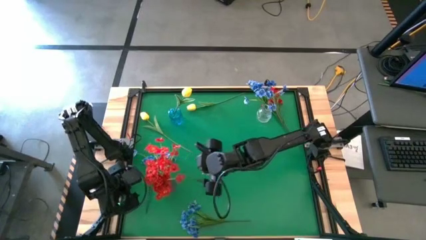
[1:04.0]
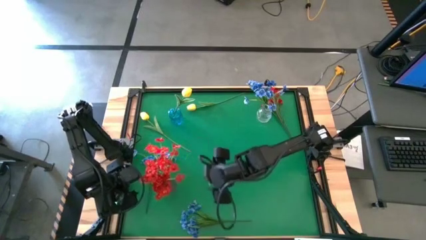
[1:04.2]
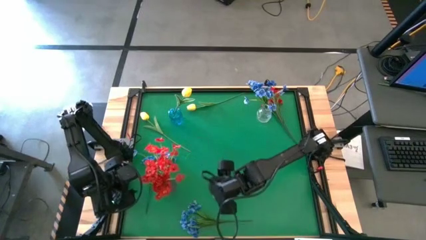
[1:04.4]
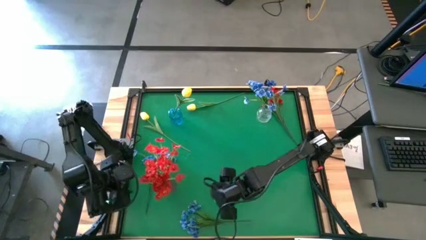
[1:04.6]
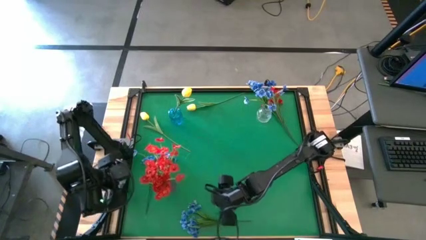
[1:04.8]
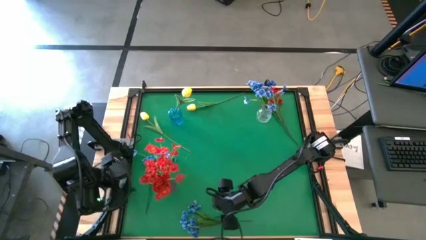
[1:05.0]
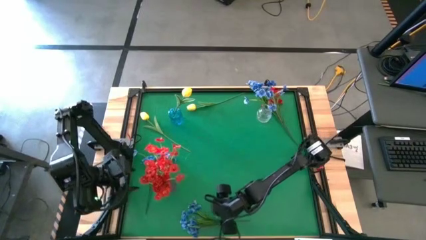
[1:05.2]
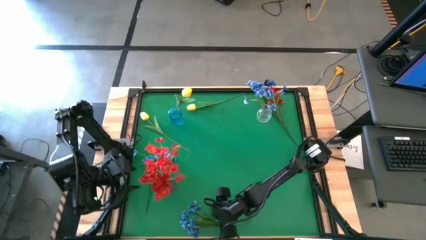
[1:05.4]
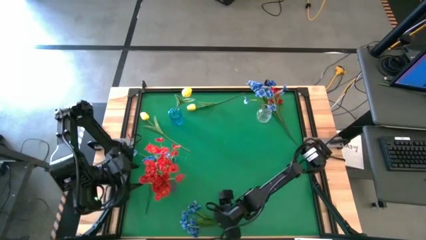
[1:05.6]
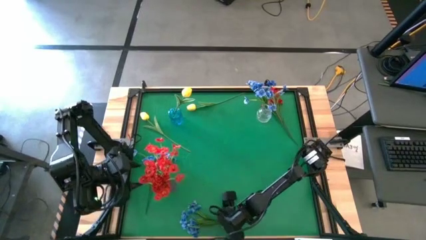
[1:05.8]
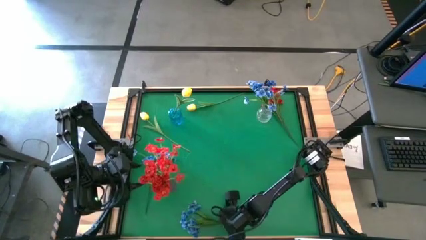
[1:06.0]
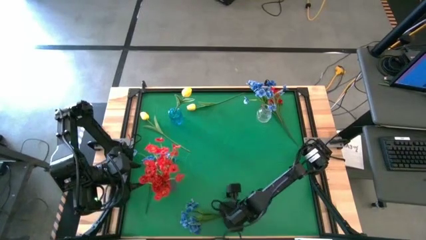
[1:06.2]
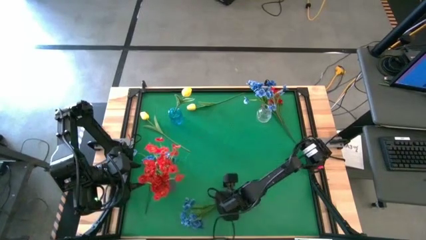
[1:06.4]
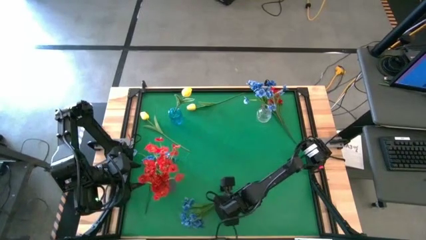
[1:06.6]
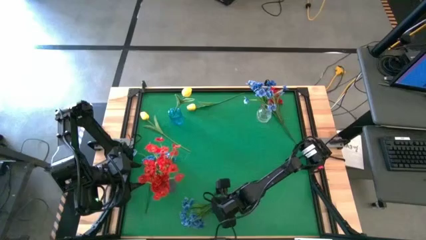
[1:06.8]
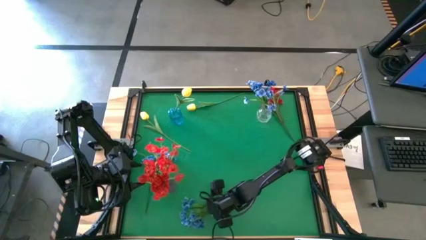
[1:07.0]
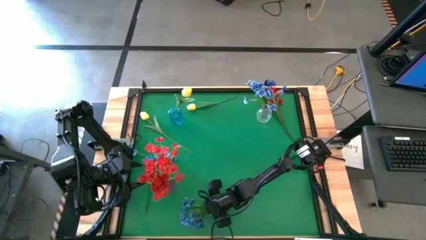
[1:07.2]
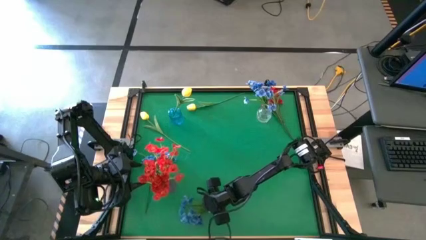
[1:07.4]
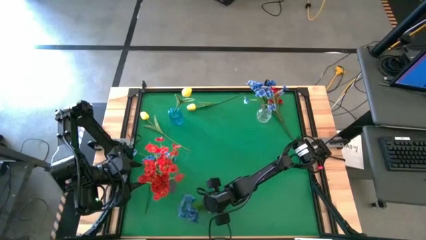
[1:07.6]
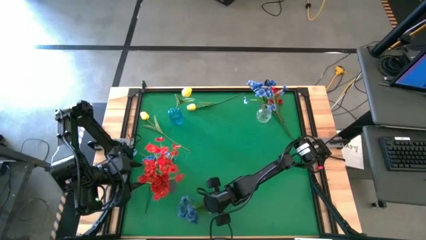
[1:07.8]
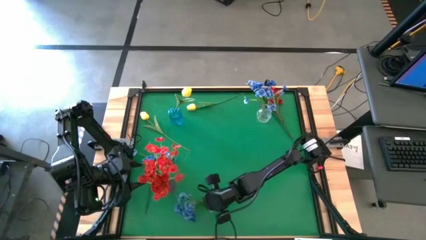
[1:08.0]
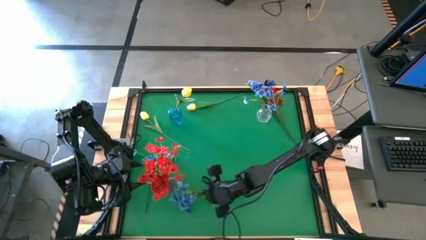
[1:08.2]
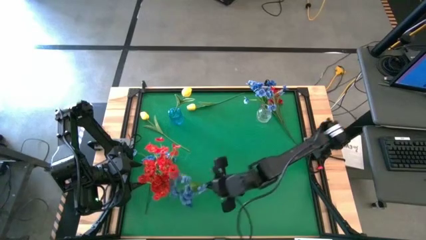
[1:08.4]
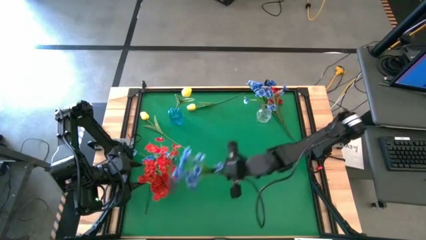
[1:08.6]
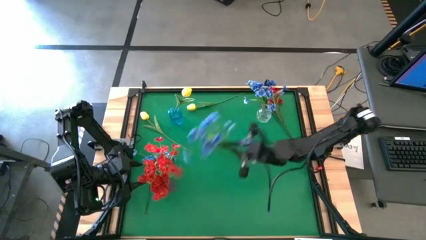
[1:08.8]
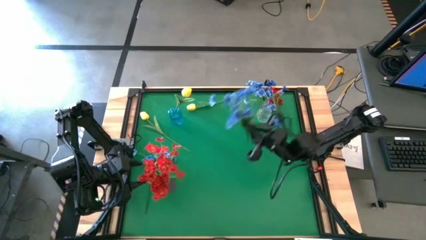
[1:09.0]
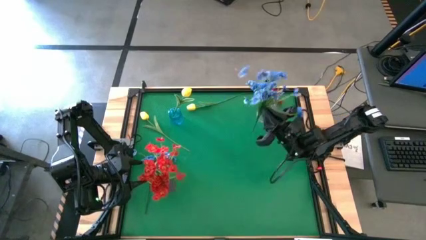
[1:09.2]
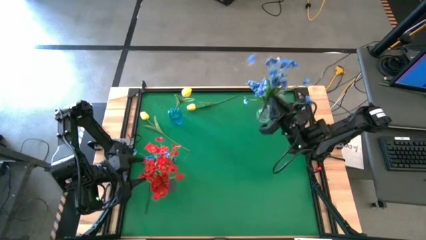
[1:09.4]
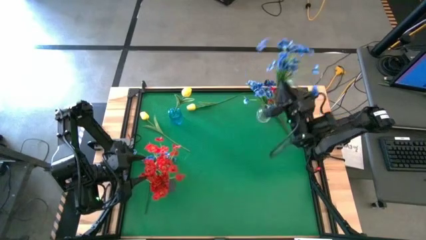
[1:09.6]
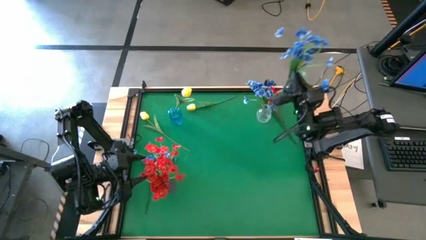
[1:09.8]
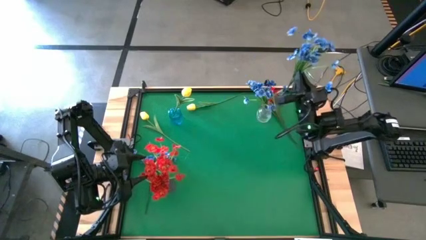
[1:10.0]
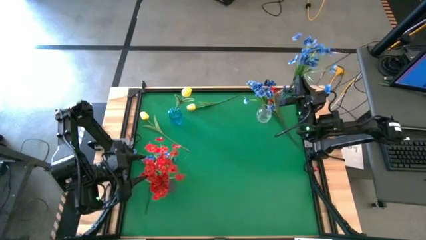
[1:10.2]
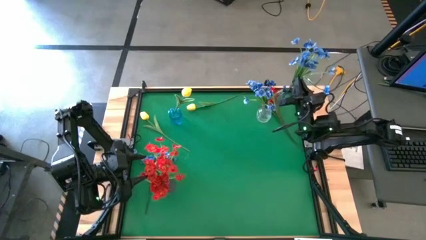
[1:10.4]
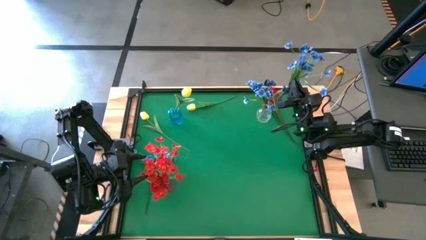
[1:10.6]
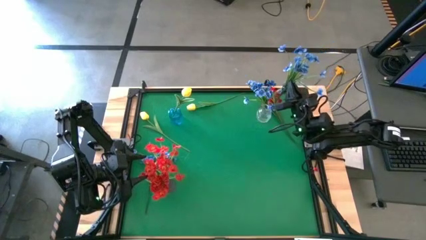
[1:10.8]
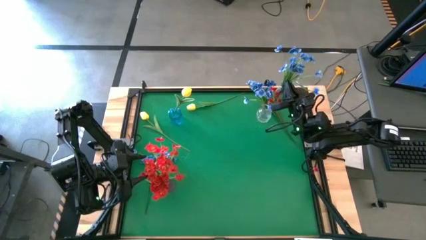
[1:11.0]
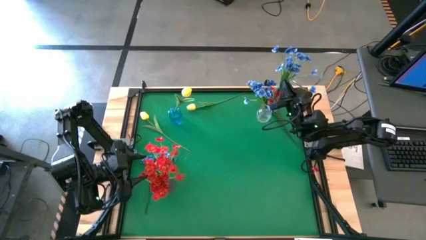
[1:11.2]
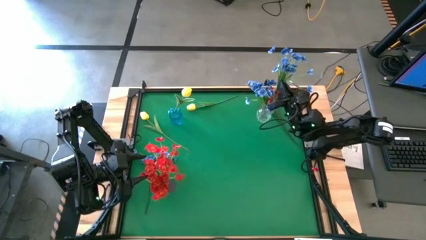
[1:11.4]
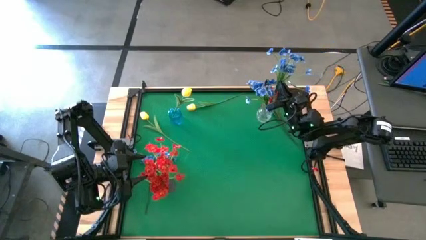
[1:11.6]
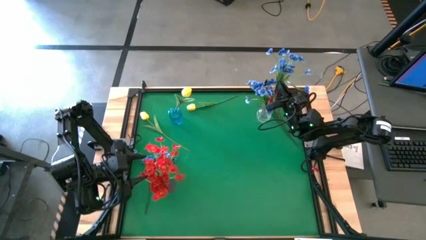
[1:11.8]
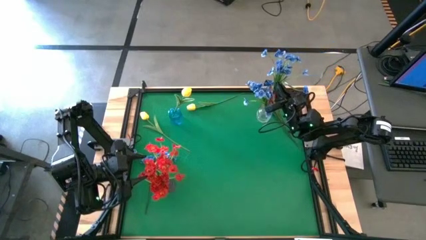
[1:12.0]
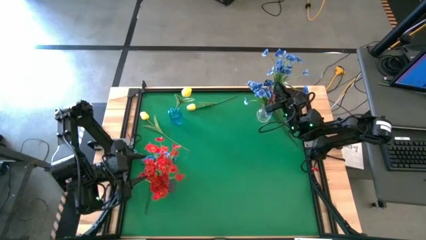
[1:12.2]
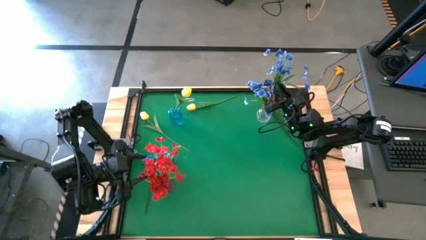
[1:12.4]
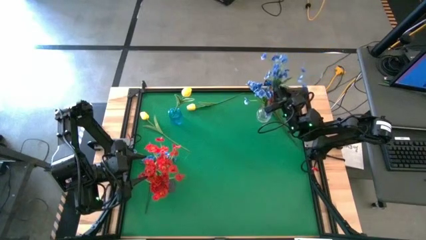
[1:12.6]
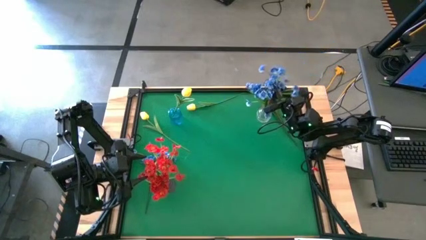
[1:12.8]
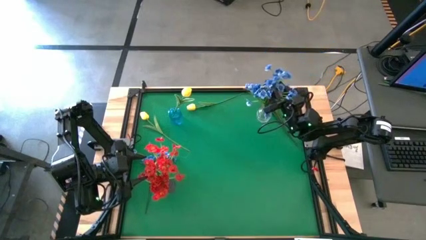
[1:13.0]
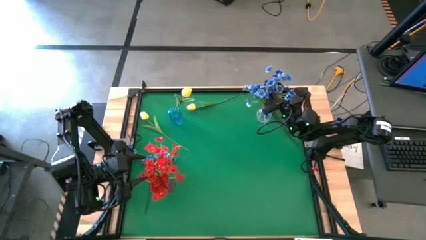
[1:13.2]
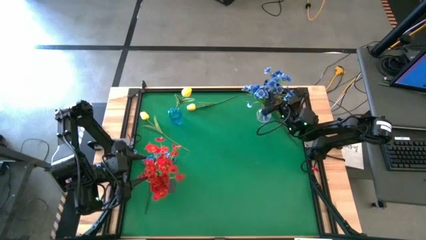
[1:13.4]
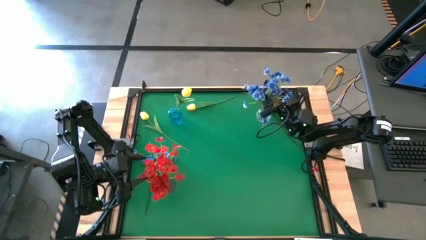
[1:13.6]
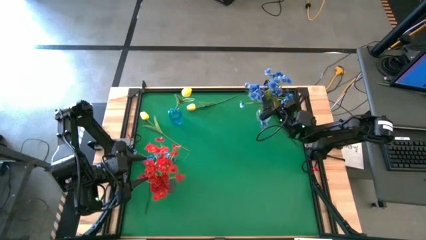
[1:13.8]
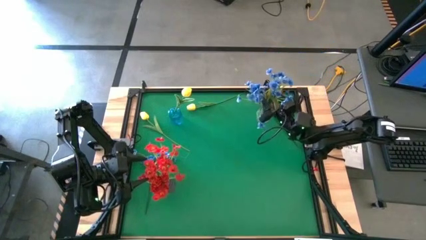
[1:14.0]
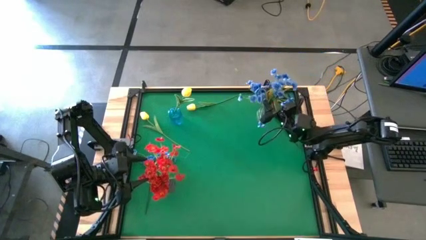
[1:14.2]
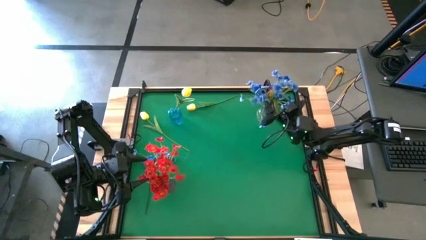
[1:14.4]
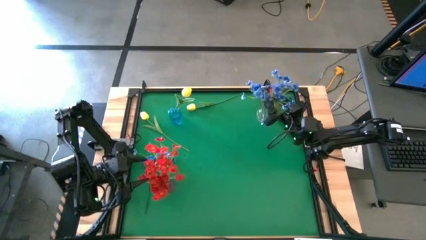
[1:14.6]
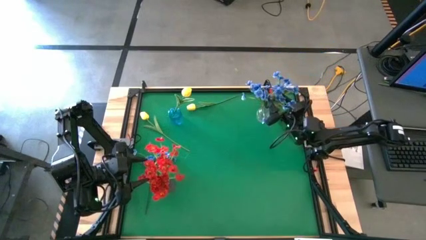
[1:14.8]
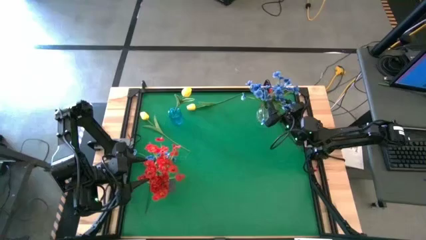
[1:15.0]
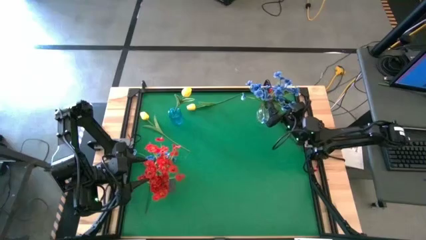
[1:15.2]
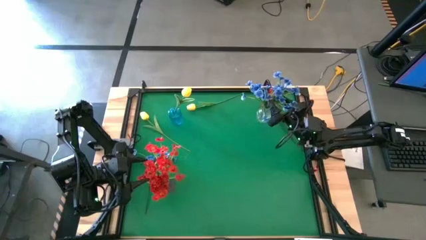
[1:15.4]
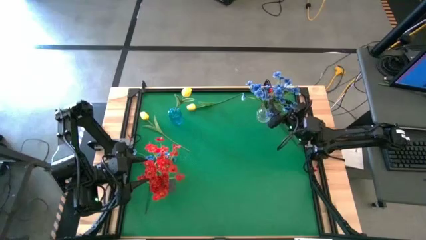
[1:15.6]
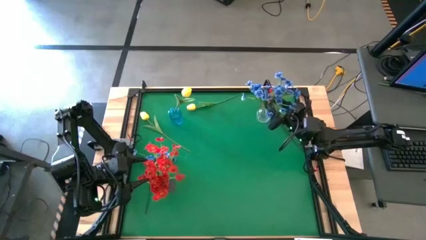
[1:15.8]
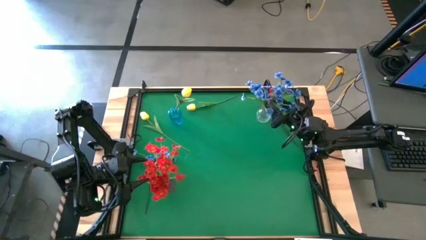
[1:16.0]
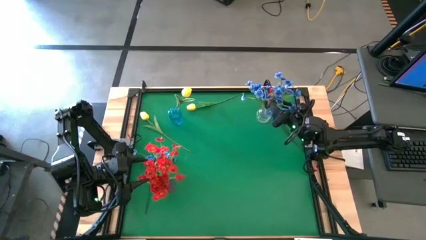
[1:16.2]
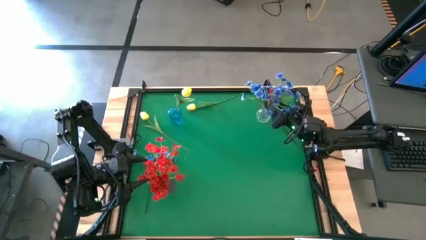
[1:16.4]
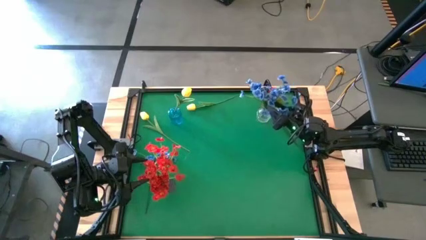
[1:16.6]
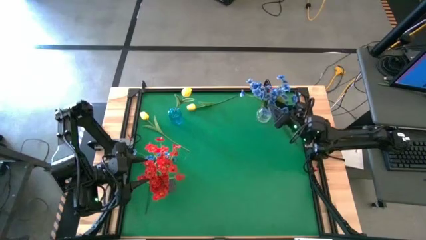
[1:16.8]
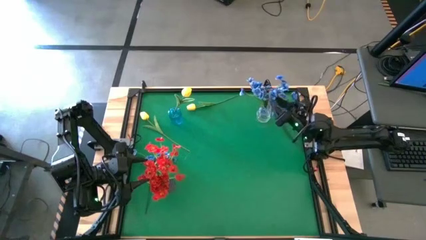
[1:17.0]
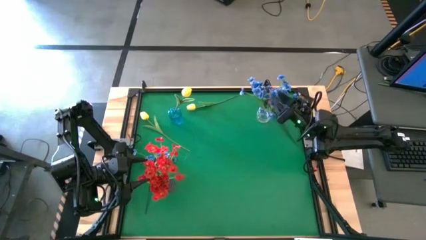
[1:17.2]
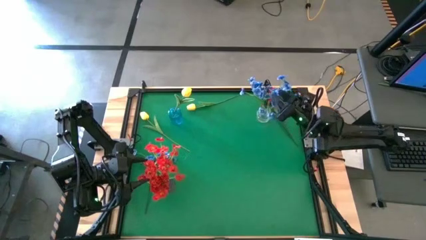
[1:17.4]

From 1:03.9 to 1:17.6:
Task: Sort flowers into vase by color
Put the blue flowers into the transparent vase

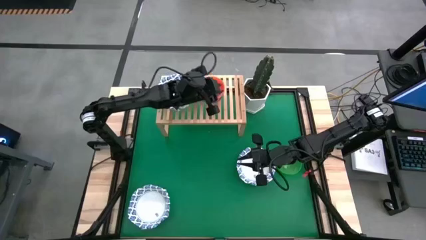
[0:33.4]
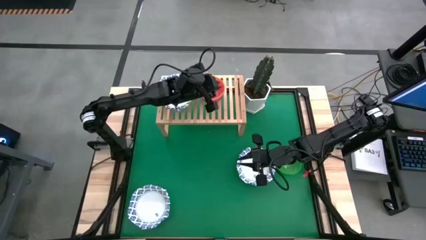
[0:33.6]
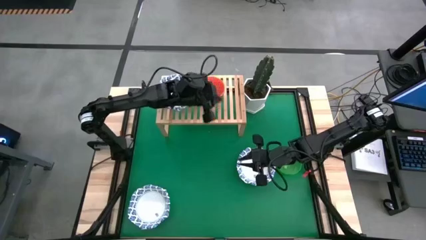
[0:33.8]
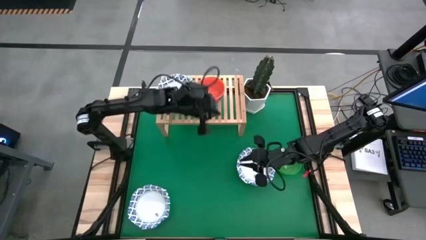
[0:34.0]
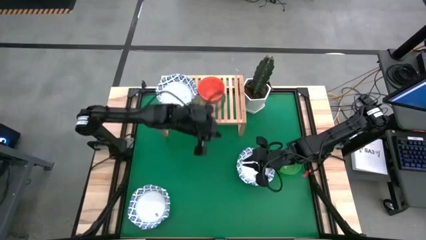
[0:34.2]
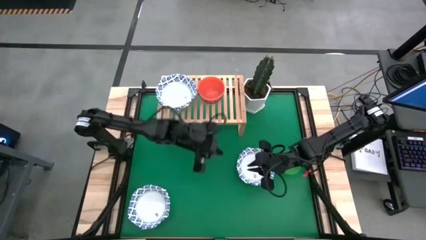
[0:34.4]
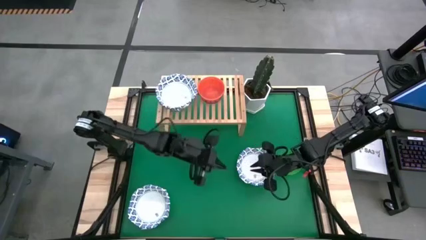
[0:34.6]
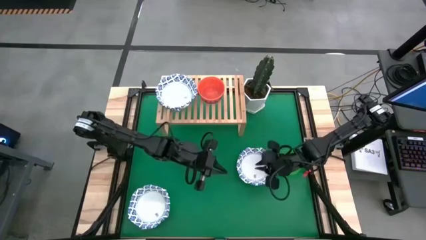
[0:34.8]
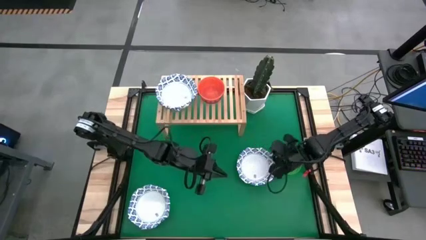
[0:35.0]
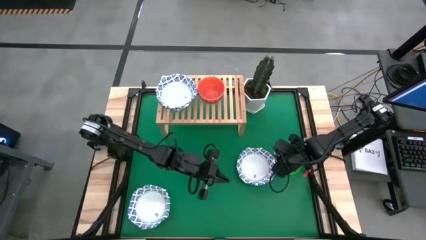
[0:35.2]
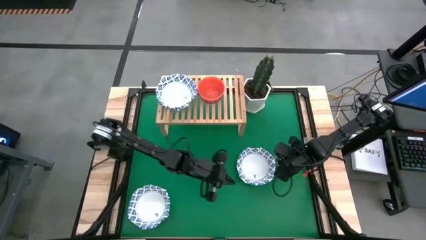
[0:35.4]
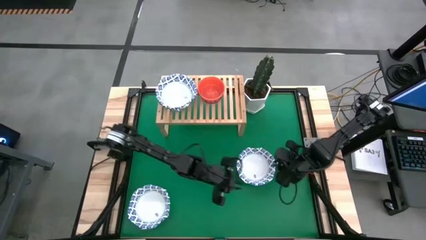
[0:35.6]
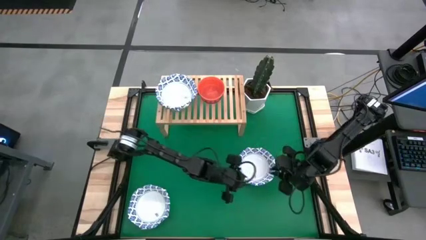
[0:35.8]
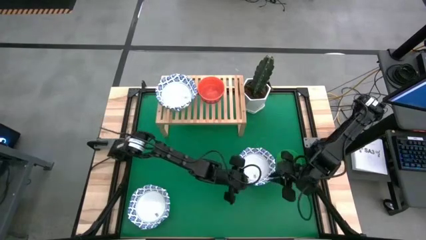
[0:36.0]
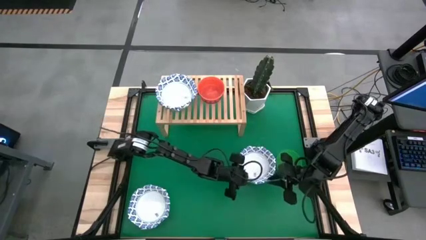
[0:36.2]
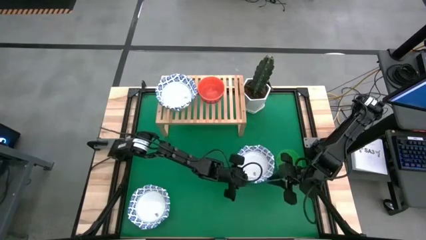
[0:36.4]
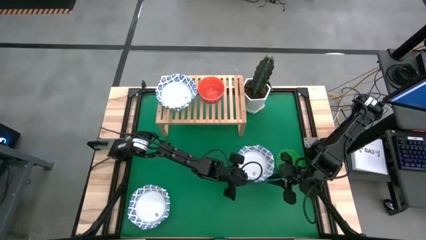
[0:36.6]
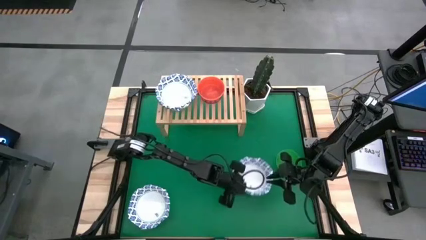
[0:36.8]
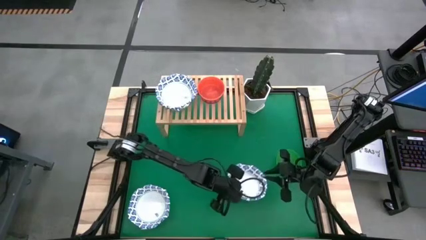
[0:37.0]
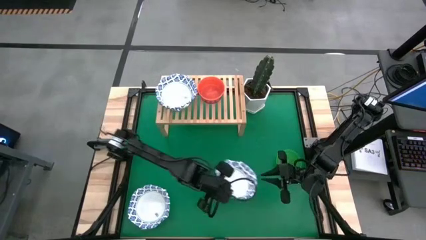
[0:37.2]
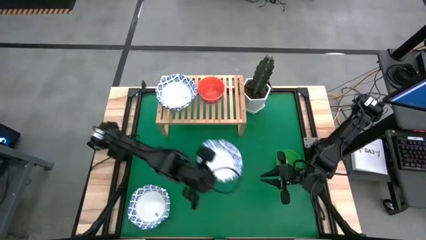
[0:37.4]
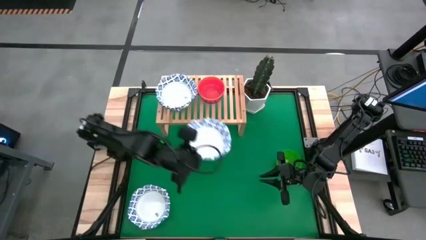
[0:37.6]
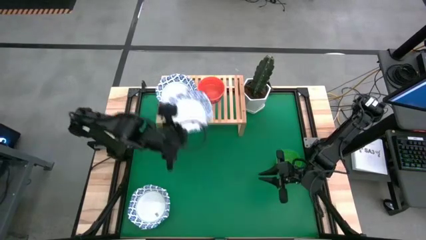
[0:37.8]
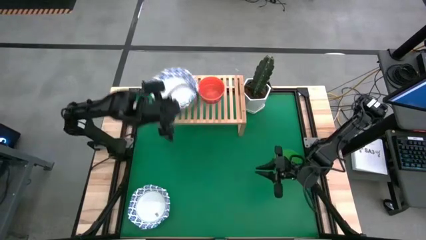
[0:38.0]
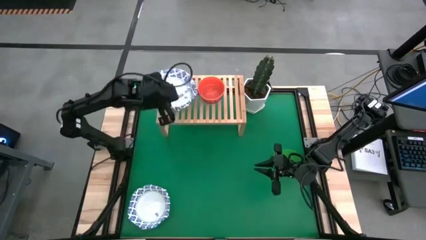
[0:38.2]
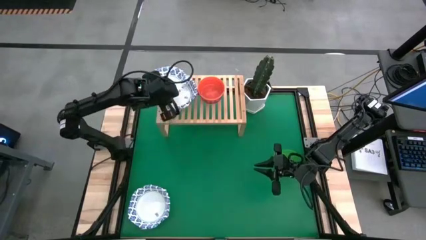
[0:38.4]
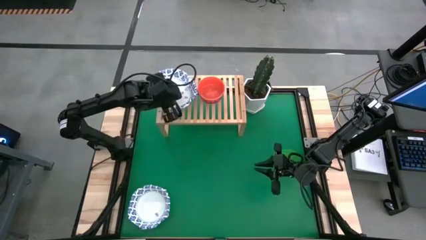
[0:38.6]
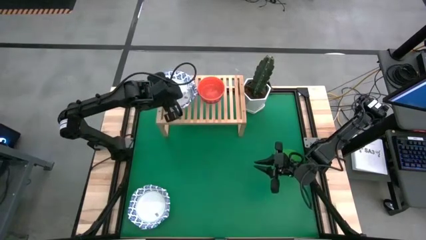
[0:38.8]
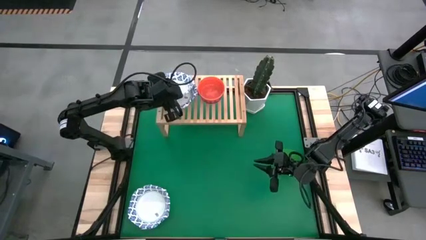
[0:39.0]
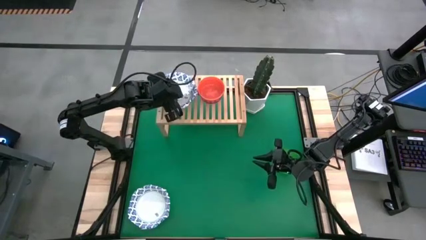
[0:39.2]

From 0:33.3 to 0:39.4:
Task: Place and stack bowls onto a shelf
Stack the blue patterned bowl on top of the blue patterned bowl on the shelf
